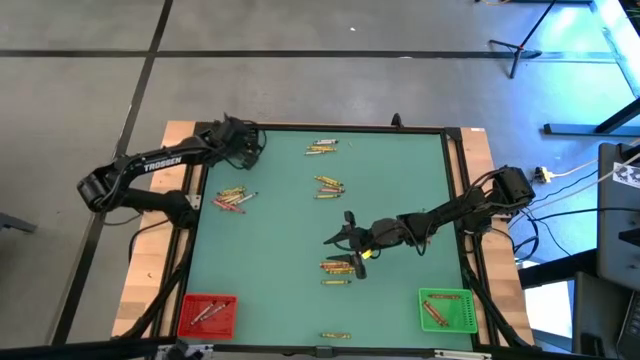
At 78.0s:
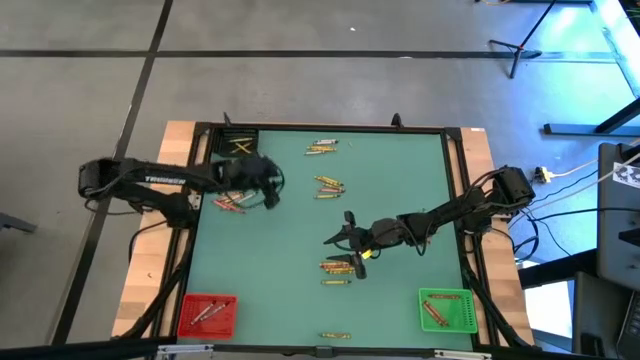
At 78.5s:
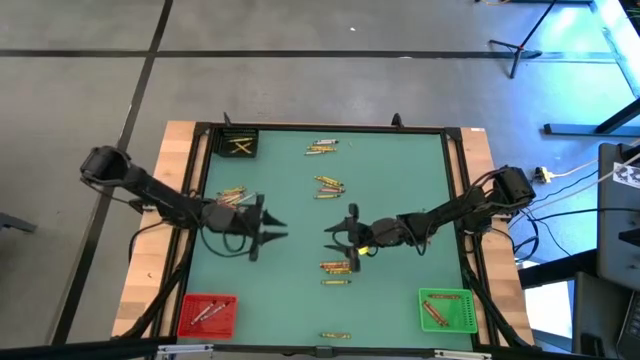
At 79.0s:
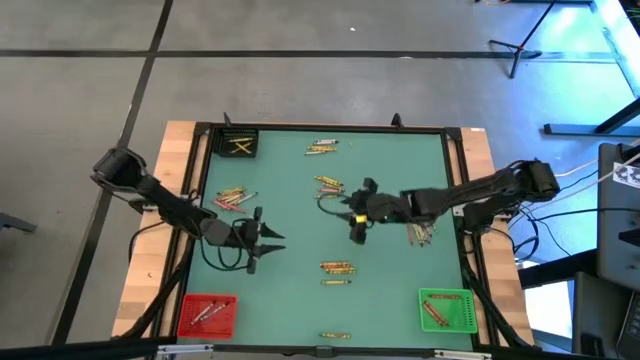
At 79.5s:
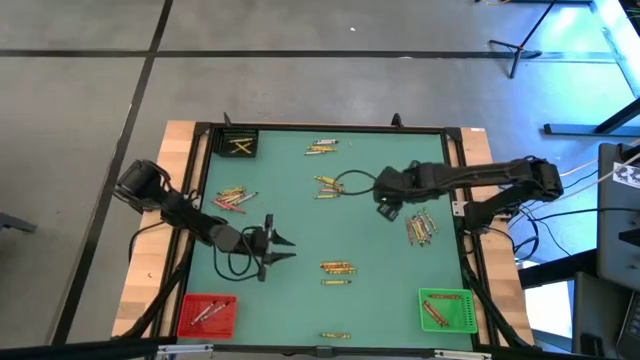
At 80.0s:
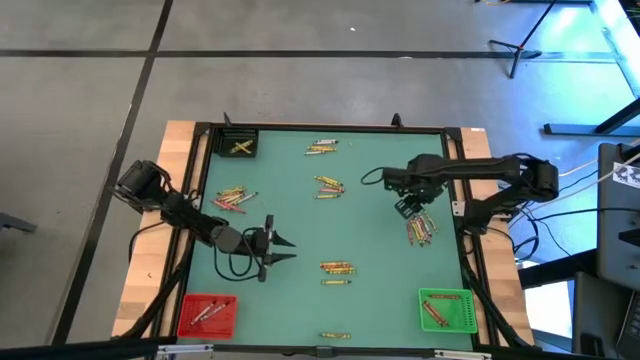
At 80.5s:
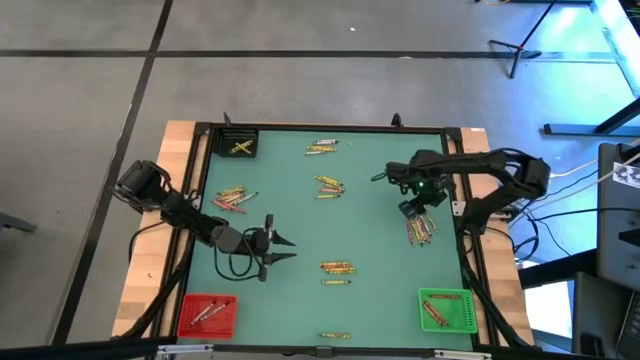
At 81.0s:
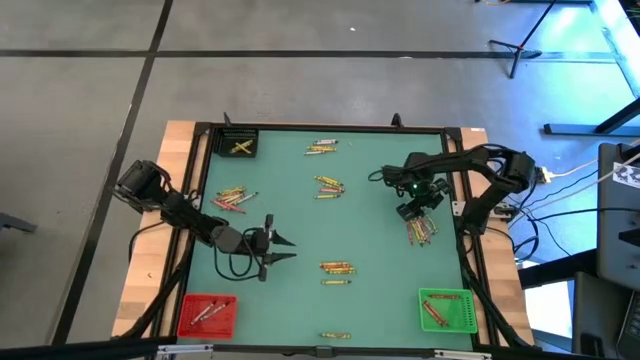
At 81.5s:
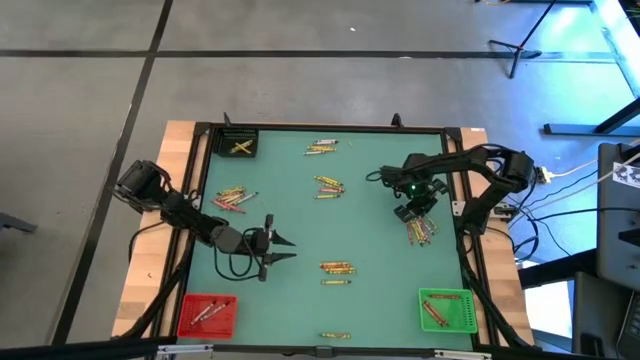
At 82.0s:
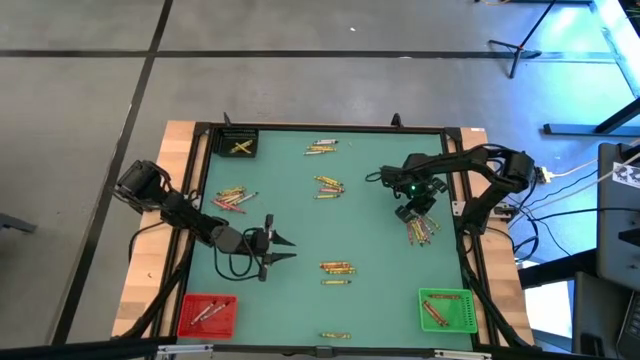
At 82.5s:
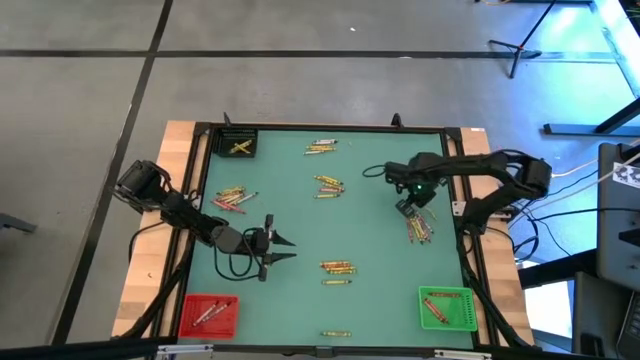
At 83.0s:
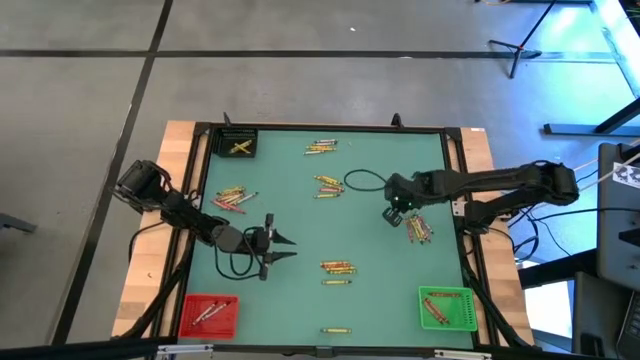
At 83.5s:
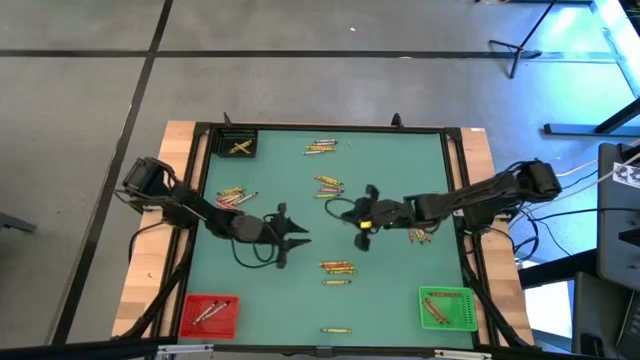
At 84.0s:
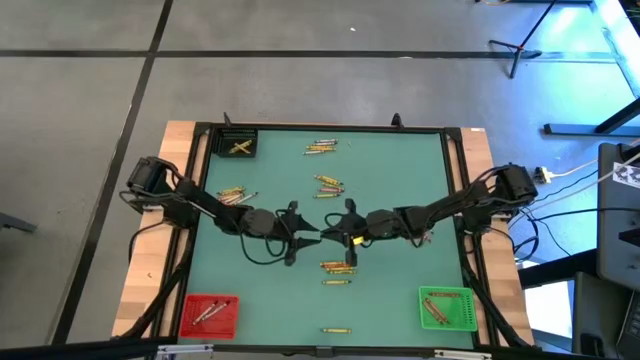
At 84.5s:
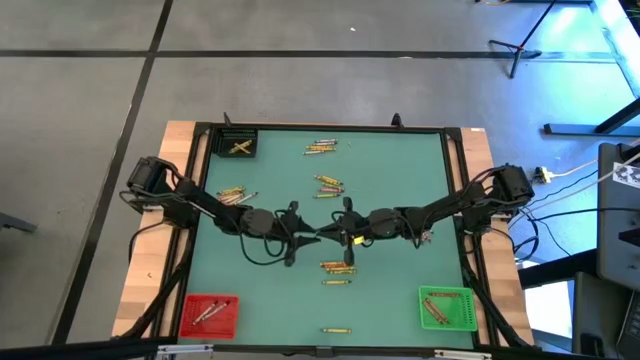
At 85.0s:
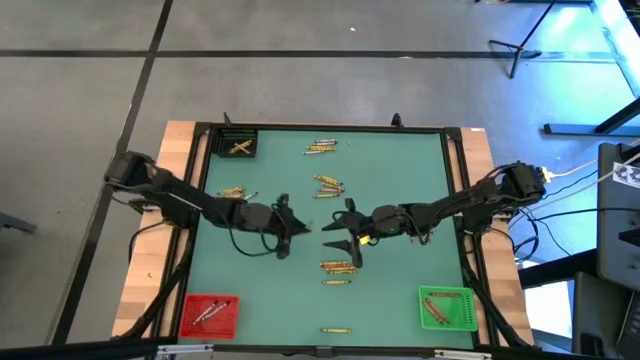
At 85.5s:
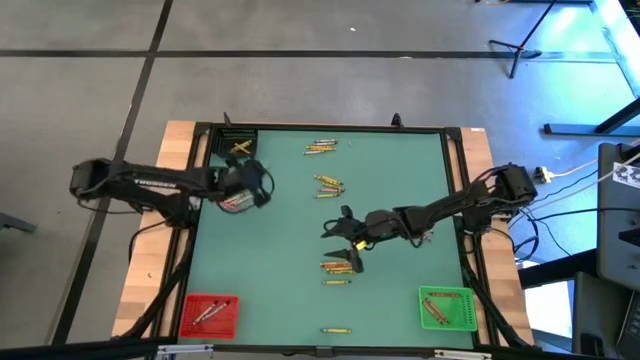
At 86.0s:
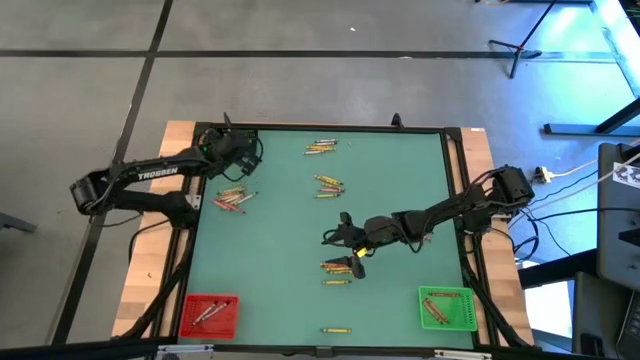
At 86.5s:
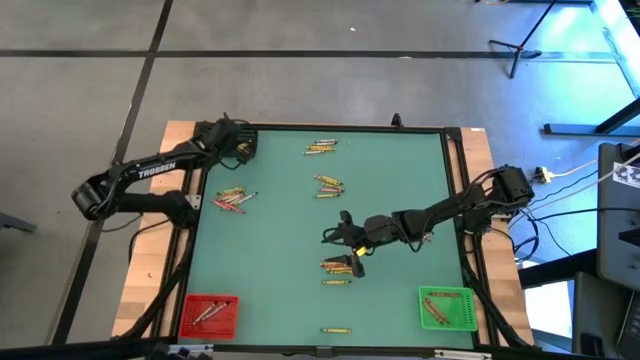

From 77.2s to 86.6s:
Task: Sort crayons
Put the green crayon into the black bin

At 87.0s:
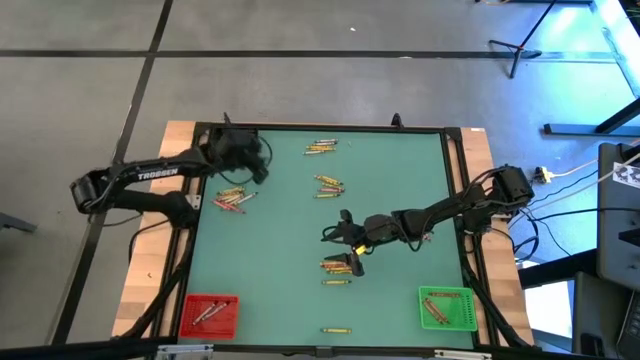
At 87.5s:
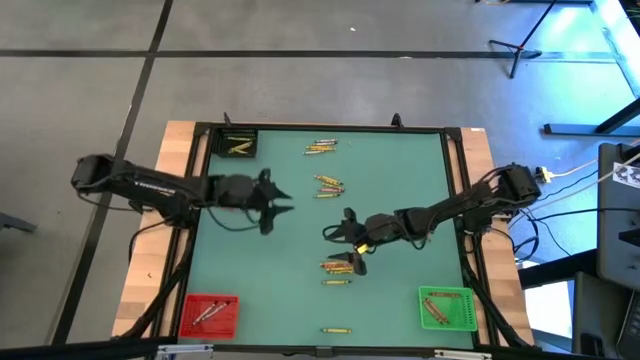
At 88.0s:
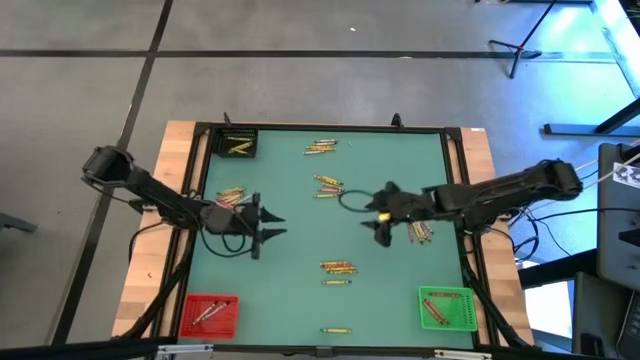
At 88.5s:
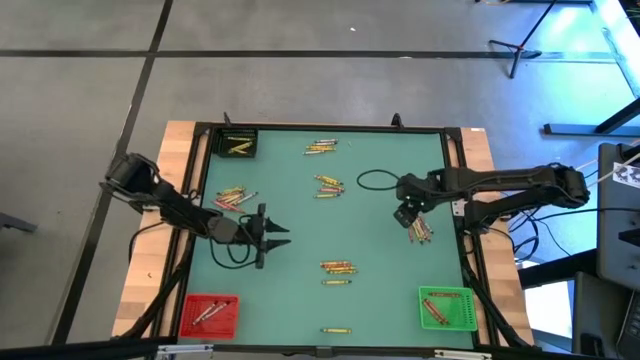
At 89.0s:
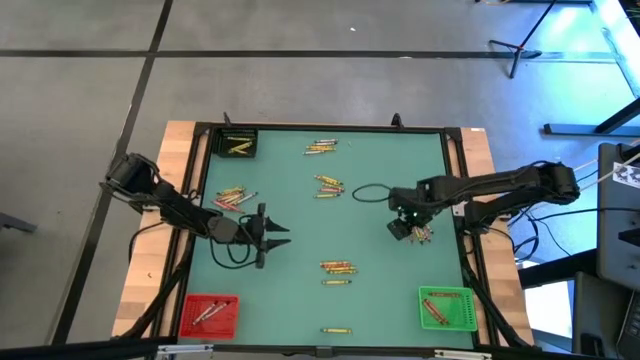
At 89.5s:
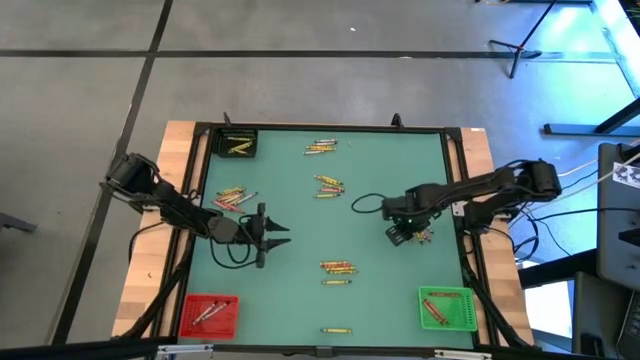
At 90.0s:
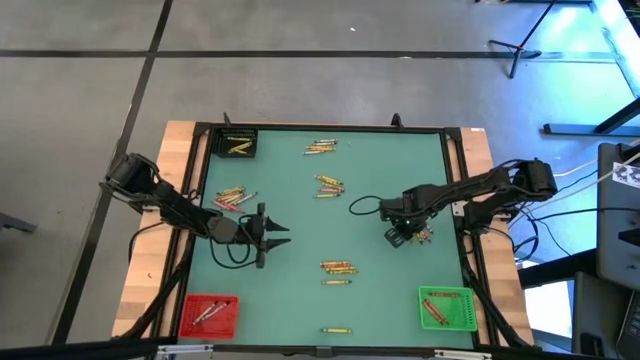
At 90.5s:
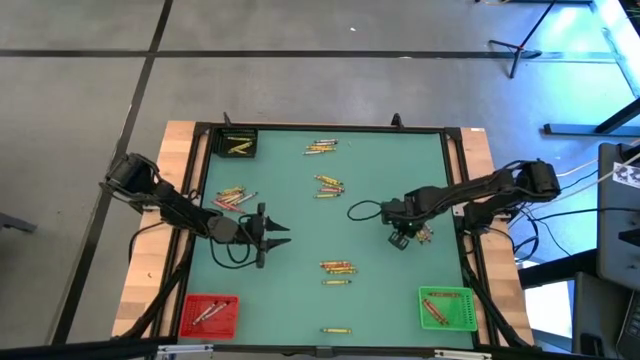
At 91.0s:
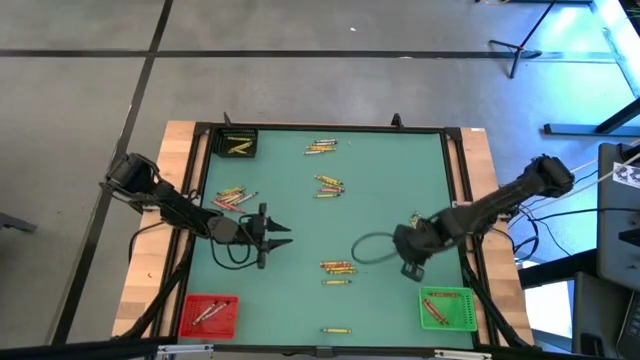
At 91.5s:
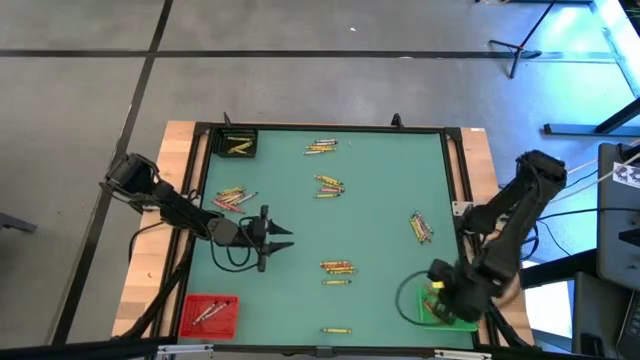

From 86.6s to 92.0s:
Put the red crayon into the green bin

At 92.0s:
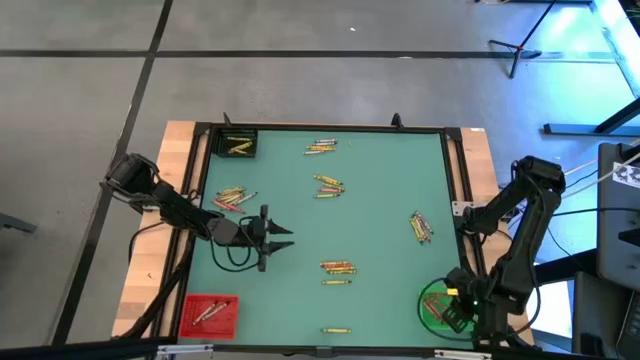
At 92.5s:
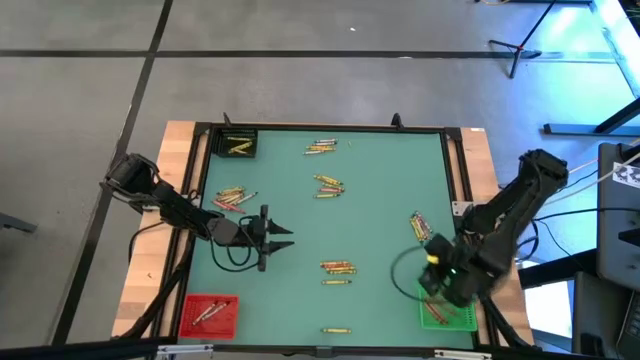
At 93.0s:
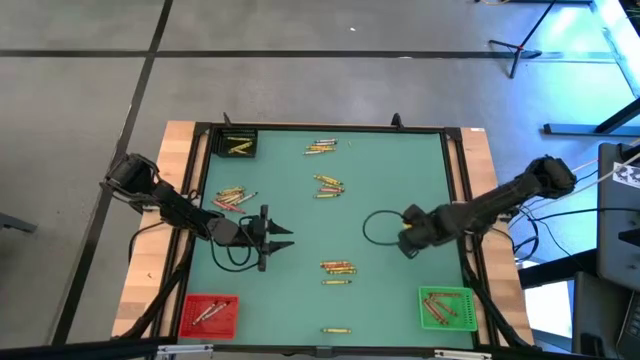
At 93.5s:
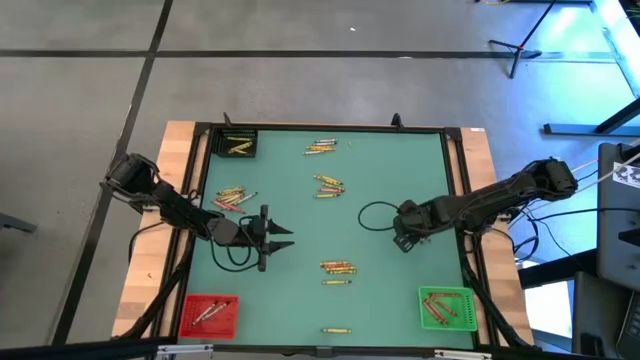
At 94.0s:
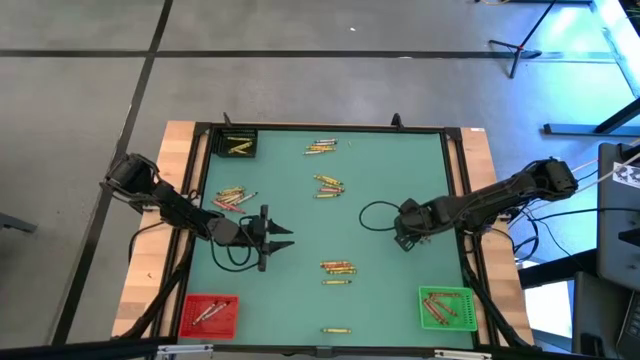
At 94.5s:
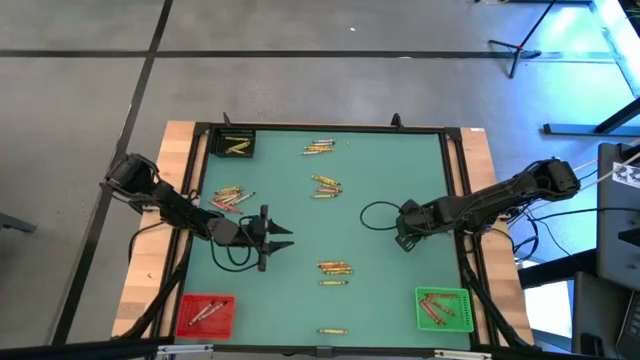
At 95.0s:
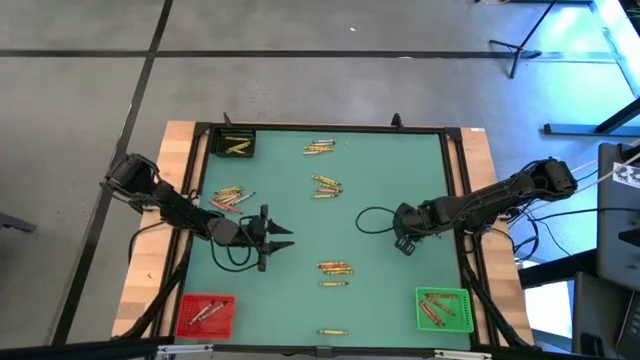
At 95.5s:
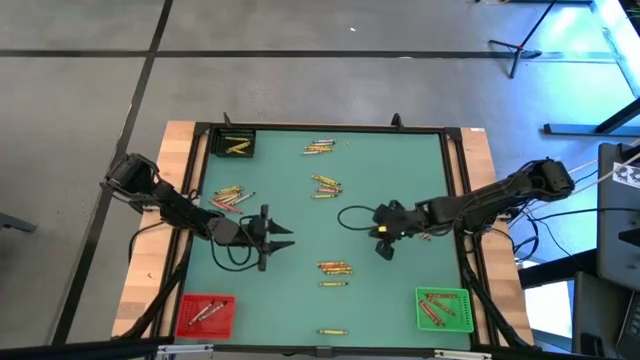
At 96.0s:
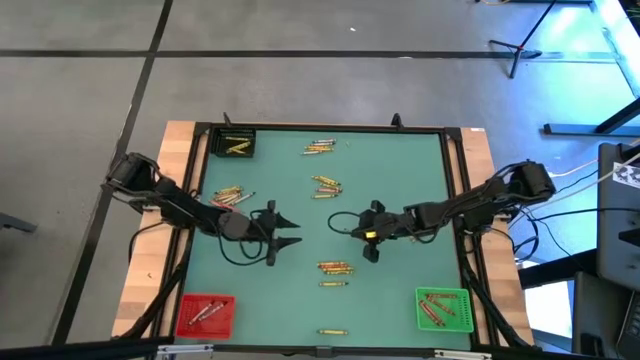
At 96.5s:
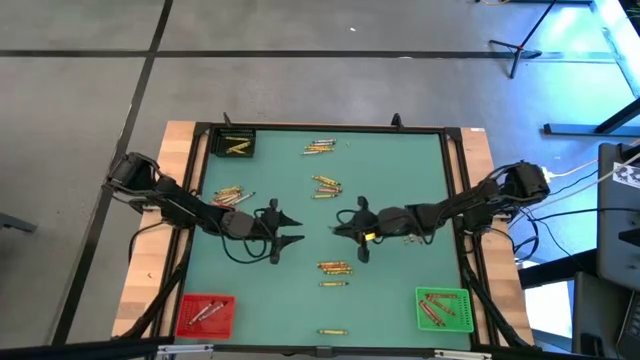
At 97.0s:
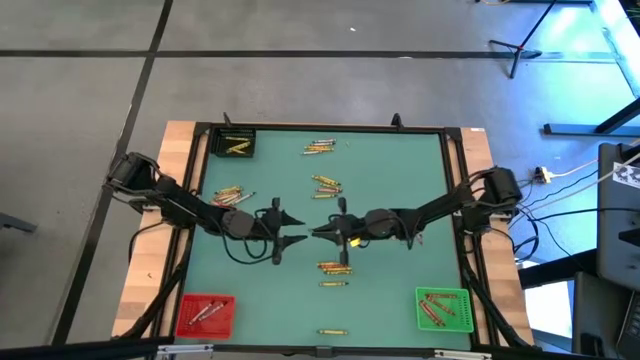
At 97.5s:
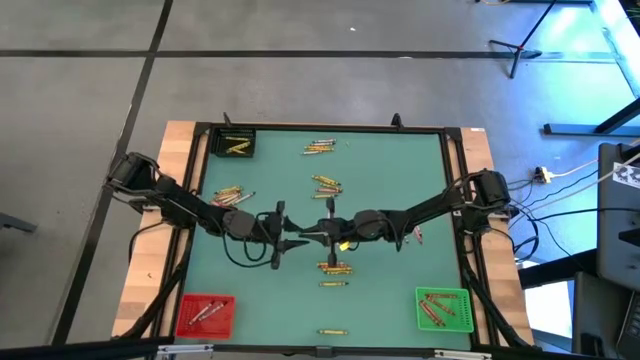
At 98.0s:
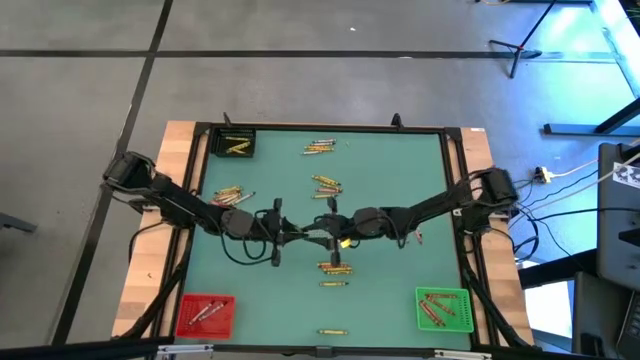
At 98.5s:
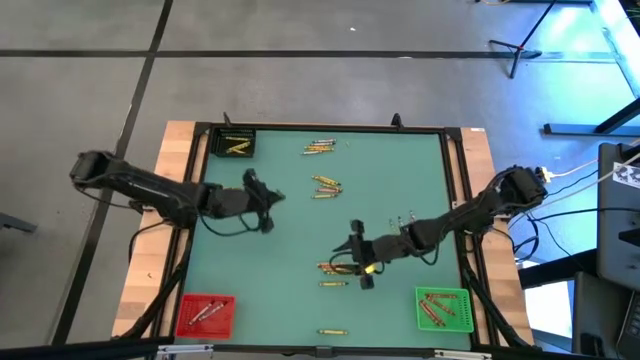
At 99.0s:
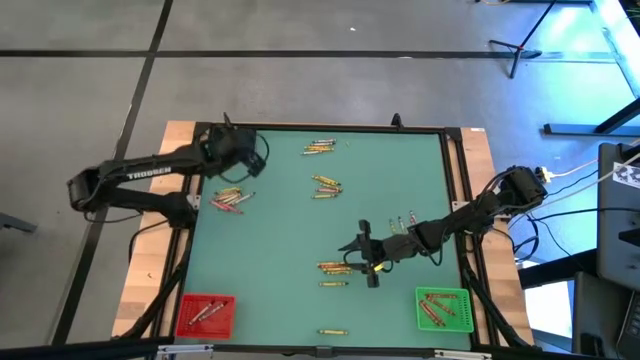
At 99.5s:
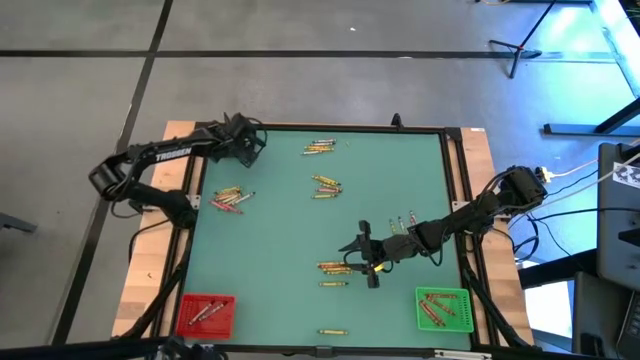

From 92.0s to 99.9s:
Put the green crayon into the black bin

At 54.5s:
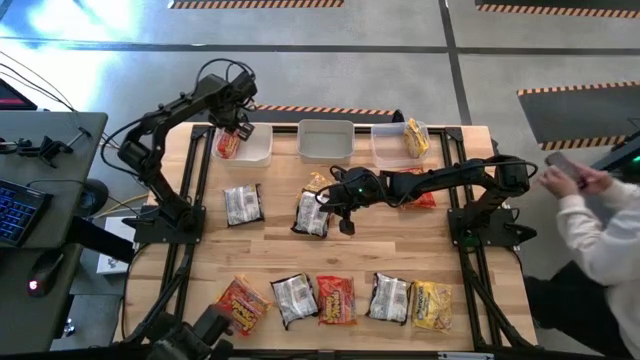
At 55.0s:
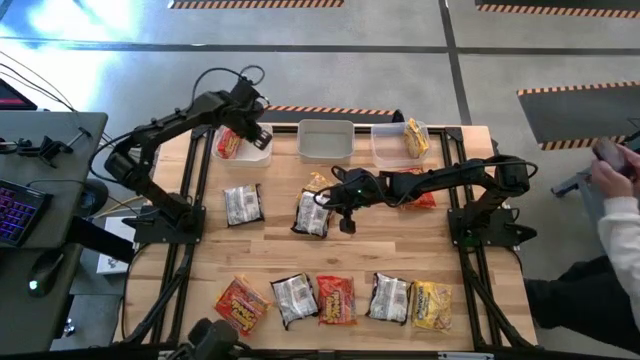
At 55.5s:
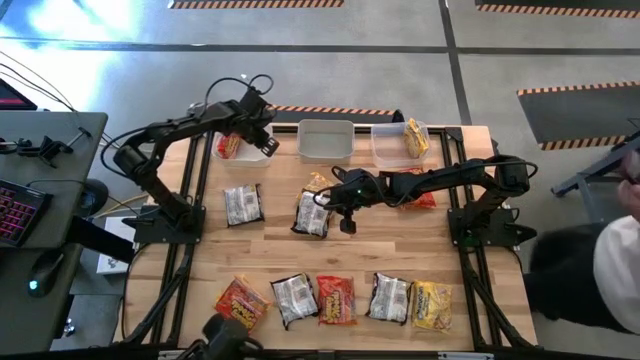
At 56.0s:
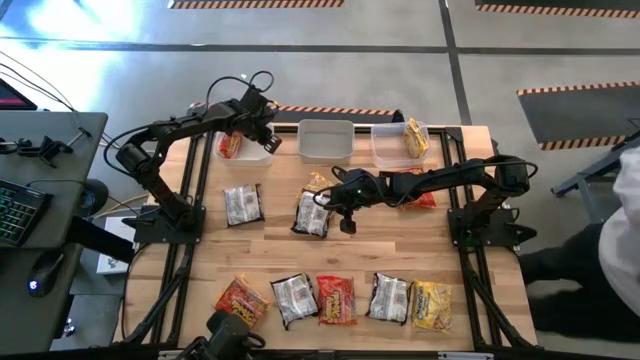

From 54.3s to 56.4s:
Task: Sort Maruchan noodles
Adjust the white bin
